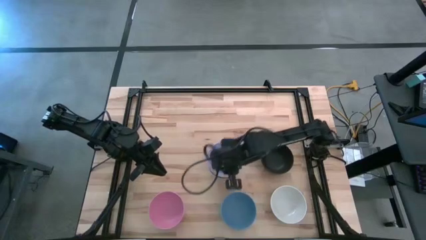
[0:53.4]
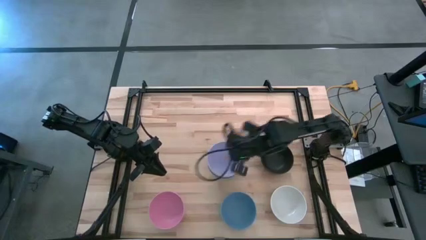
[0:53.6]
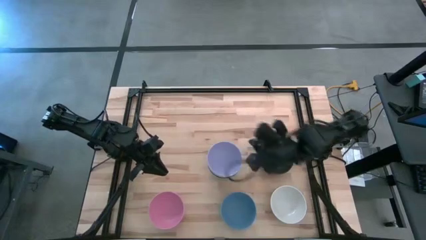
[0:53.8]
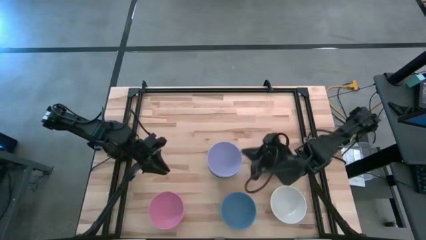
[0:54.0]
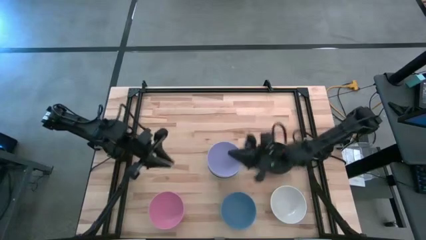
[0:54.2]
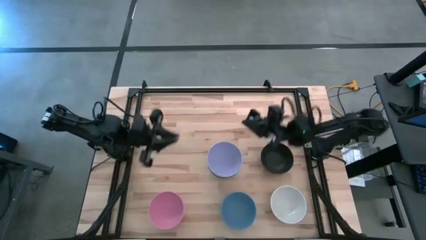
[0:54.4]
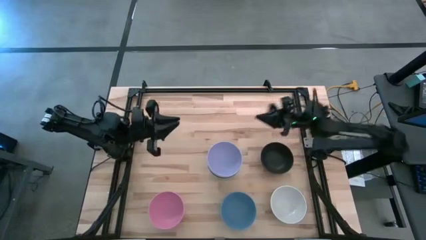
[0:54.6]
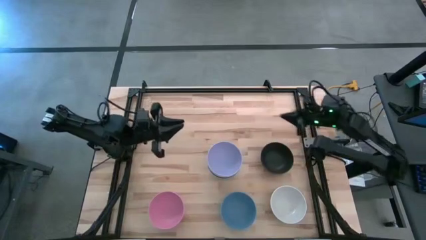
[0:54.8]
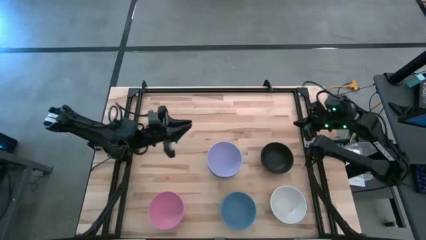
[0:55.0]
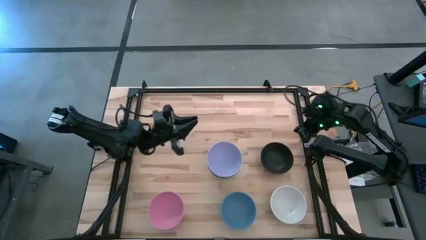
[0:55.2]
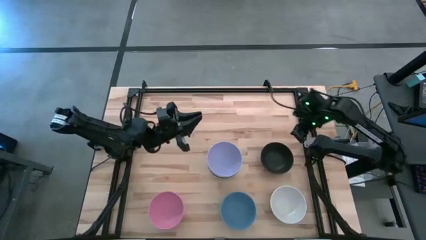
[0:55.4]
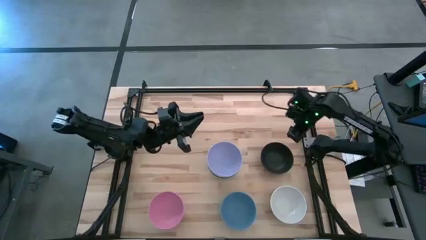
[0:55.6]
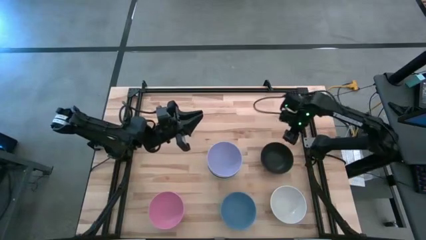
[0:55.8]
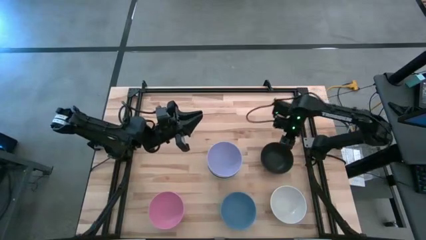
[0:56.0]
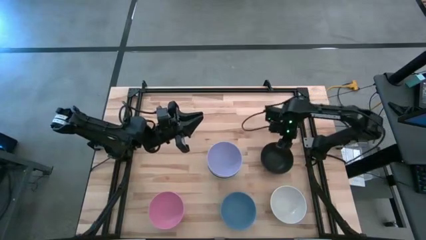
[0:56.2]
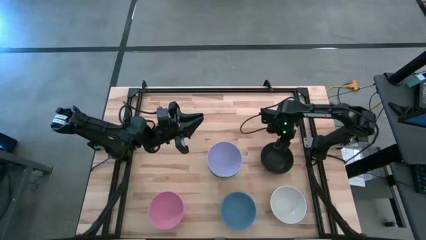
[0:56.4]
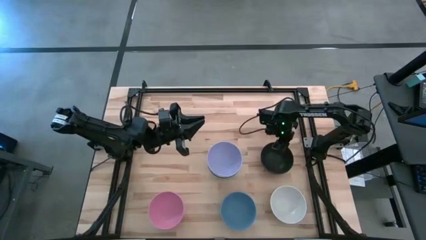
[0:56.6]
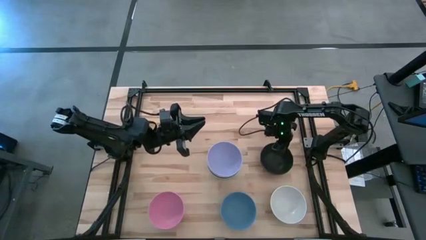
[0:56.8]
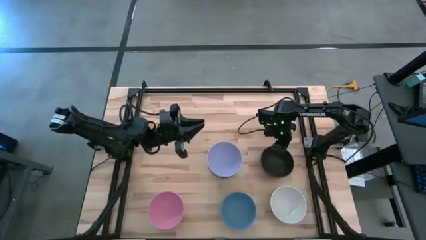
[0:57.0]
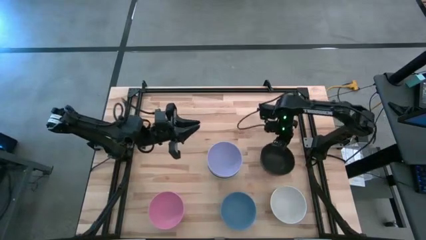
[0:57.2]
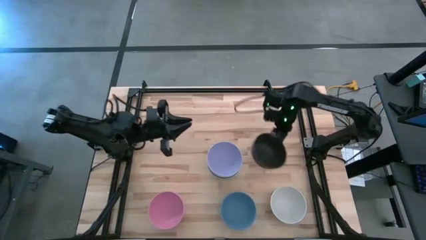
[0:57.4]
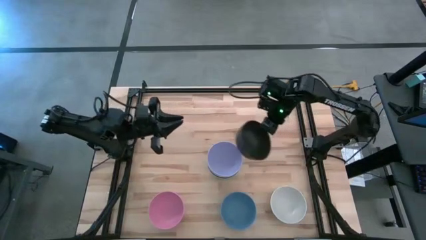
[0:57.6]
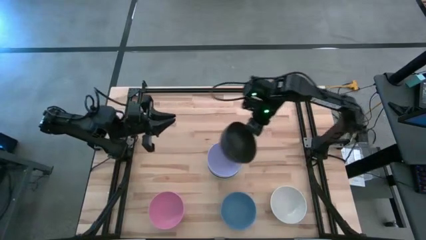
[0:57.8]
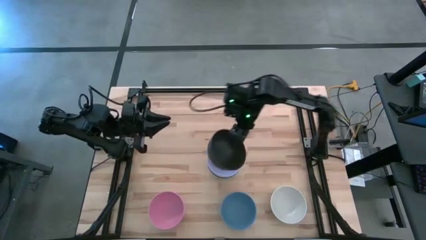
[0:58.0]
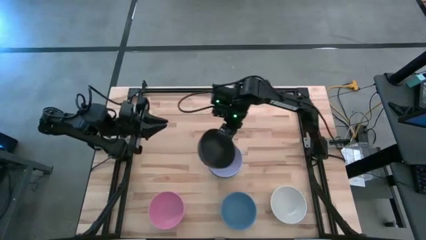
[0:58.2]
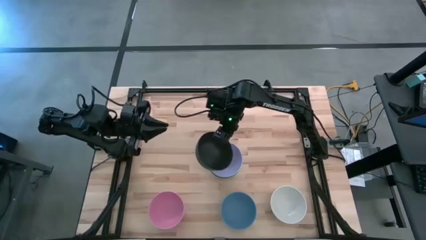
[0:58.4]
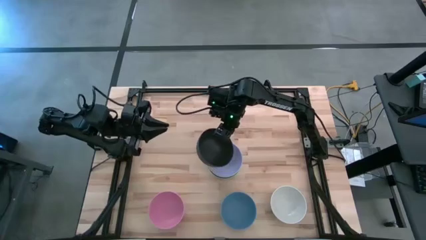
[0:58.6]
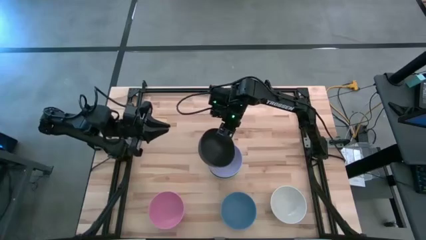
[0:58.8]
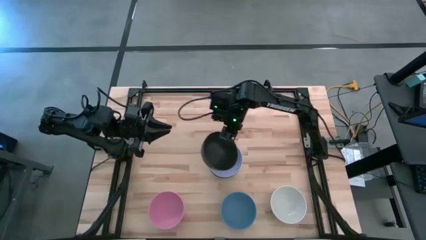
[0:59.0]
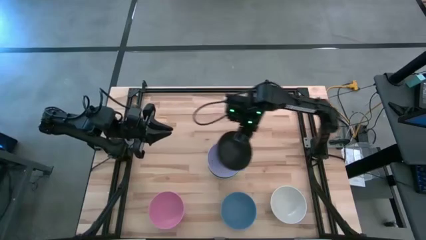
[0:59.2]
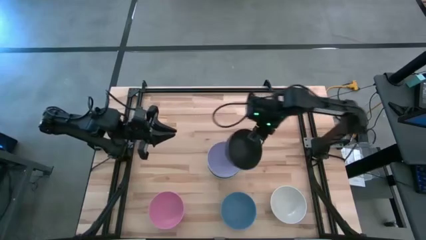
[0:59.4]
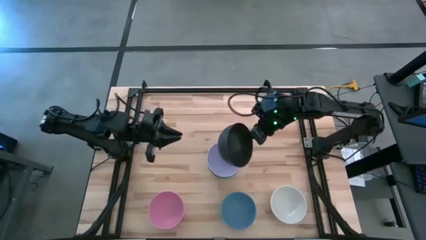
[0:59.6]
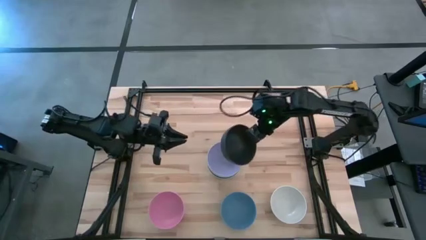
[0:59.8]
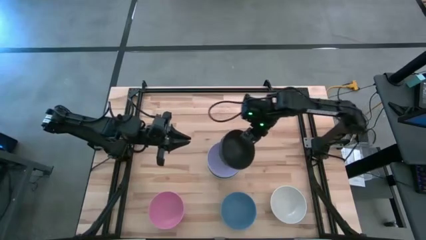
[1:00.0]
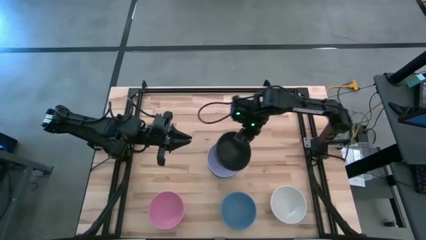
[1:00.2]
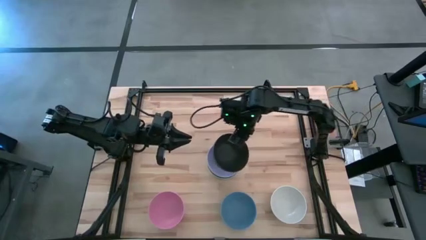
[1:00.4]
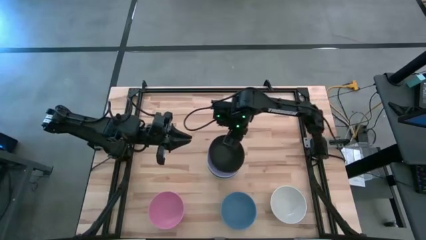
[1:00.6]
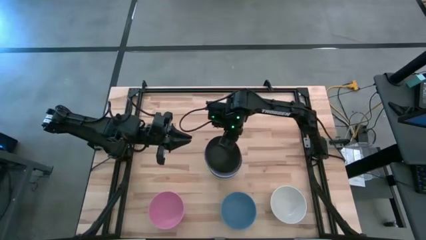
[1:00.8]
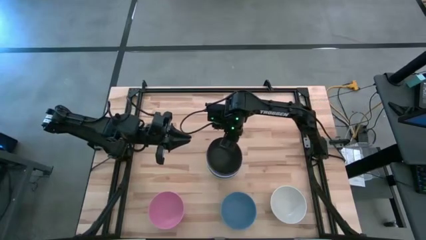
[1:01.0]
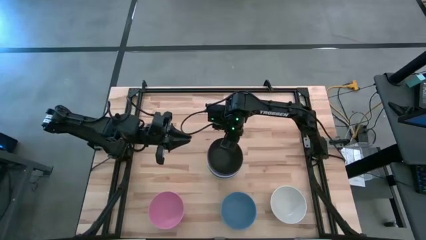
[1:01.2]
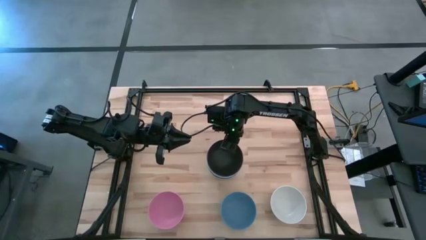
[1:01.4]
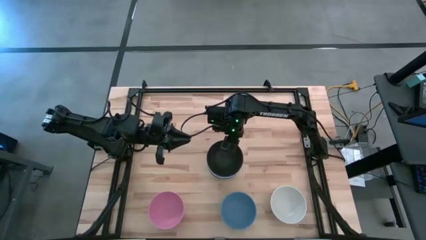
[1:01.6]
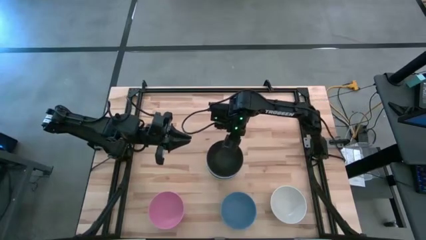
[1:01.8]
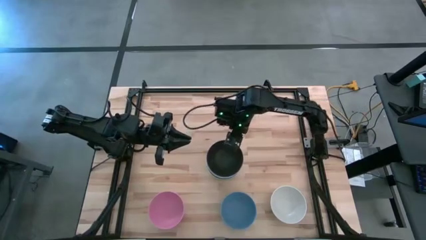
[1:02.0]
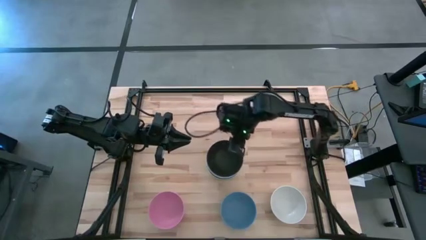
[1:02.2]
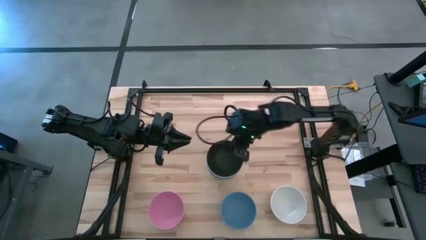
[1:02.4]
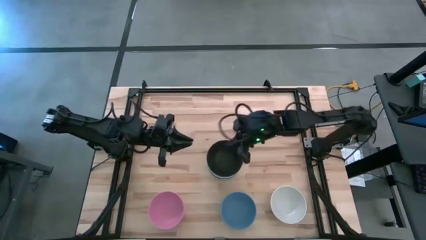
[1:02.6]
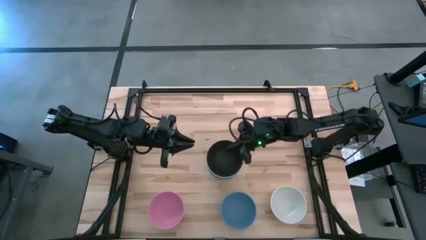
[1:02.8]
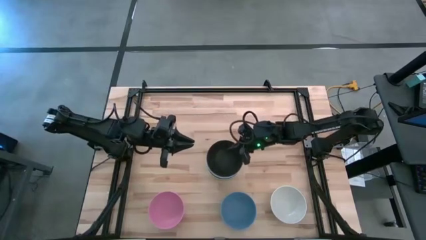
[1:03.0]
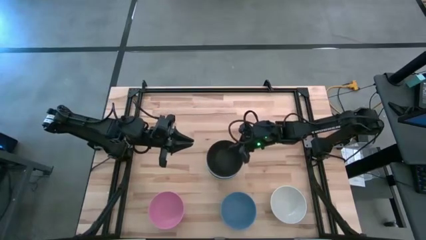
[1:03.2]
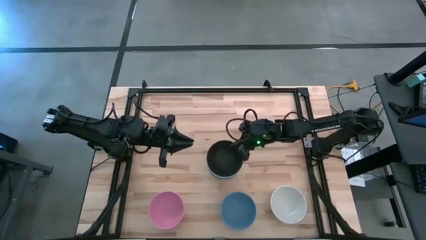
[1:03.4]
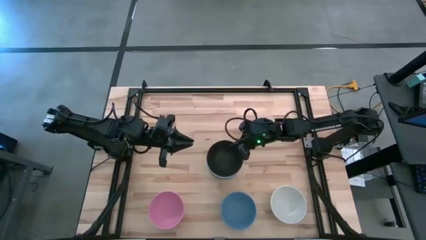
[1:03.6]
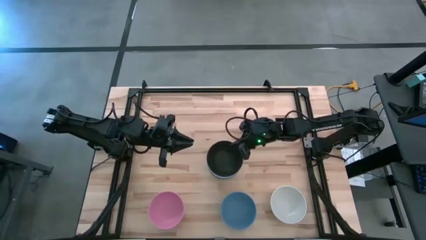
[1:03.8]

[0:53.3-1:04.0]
Task: Nest bowls inside each other
Stack the black bowl on the purple bowl

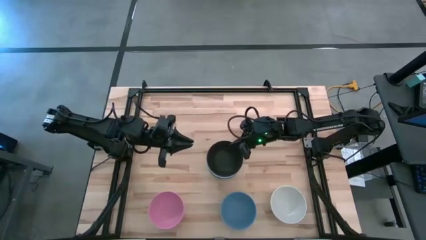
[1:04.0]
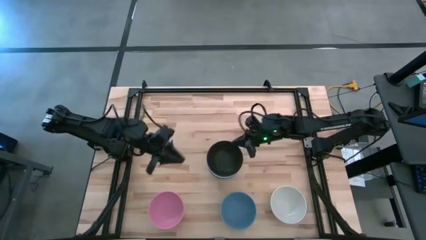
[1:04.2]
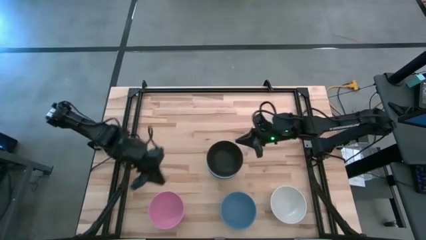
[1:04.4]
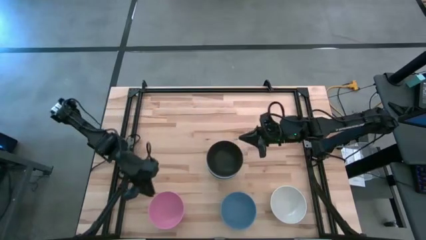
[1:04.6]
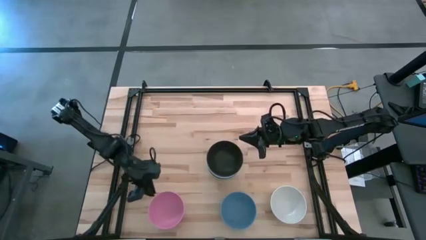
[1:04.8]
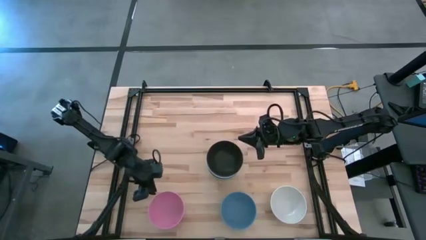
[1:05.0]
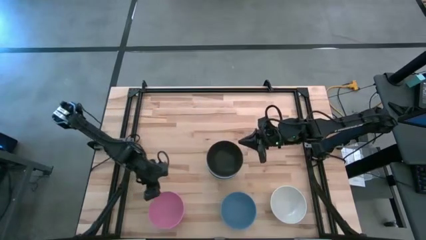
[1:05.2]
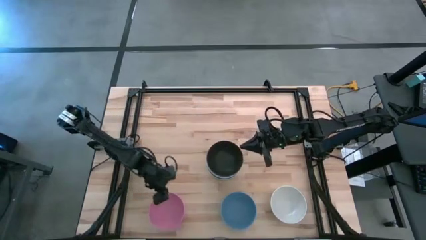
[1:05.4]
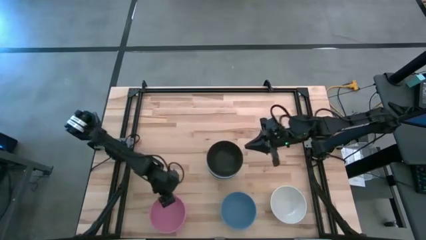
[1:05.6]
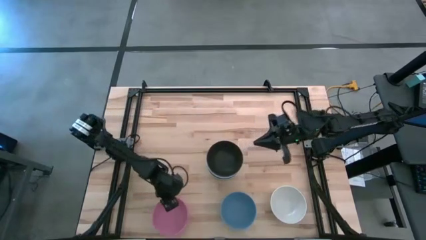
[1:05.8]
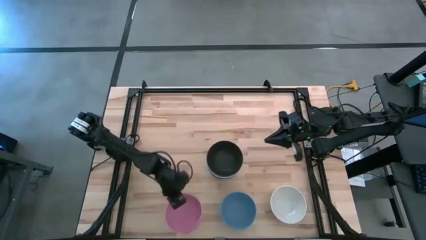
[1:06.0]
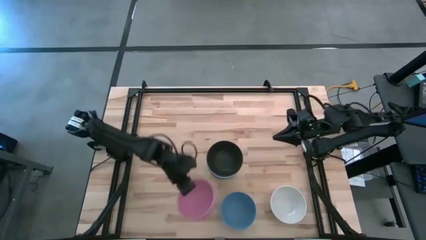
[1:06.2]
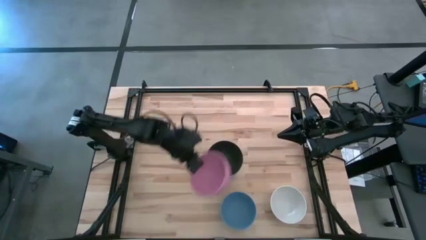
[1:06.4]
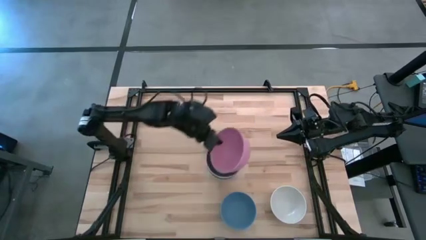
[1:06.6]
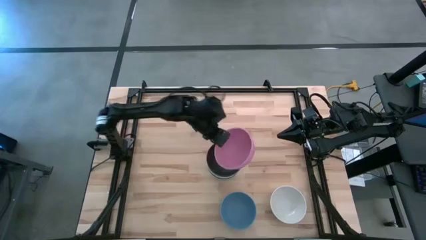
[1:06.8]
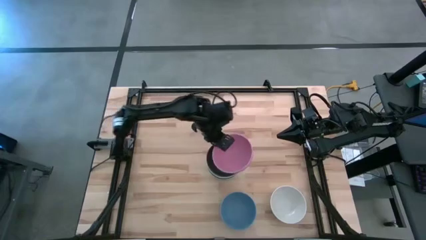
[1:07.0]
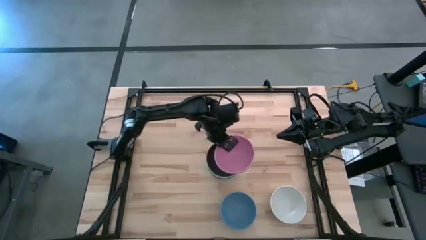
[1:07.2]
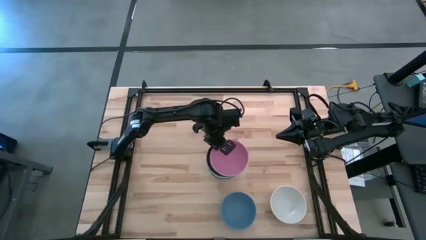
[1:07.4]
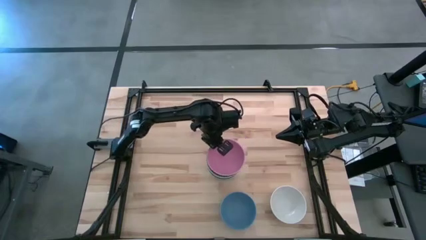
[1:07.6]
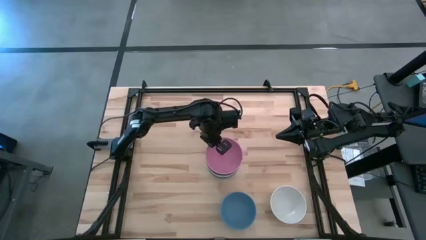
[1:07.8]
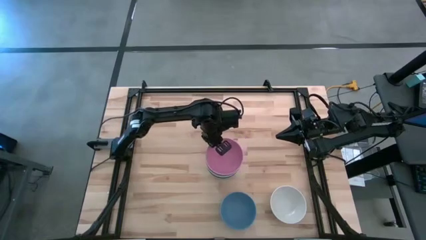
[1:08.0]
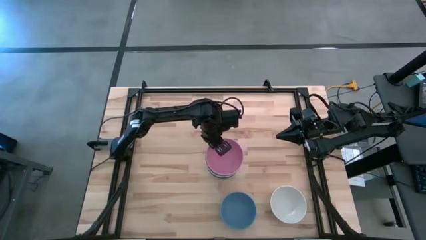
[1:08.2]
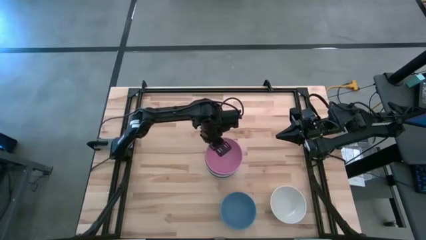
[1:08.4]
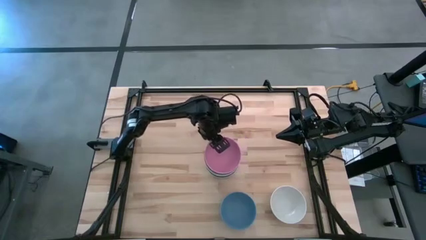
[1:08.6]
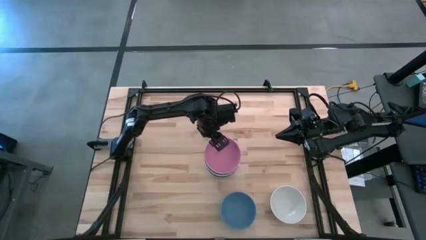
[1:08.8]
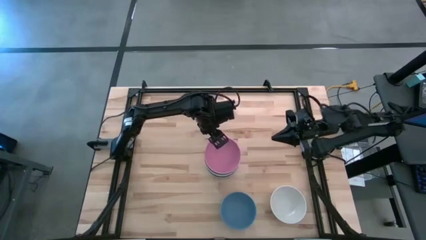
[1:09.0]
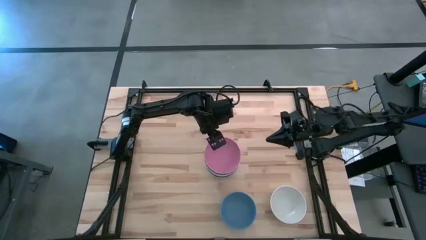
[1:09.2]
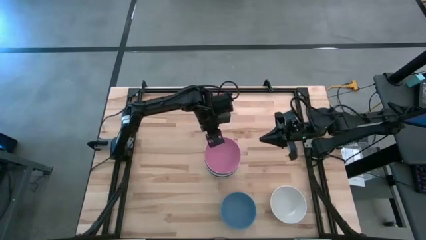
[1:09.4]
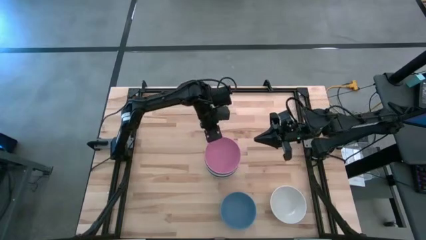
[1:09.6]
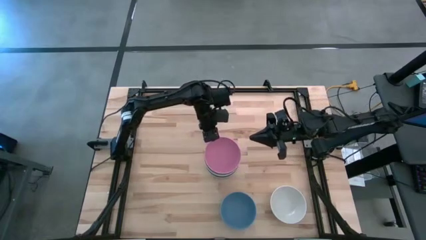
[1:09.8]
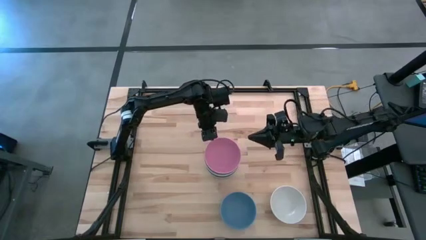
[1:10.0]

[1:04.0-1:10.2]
Stack the pink bowl on the black bowl

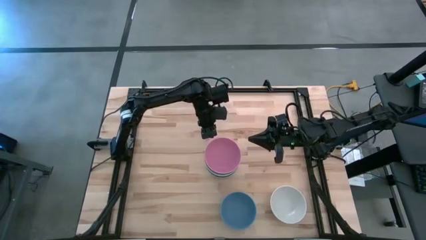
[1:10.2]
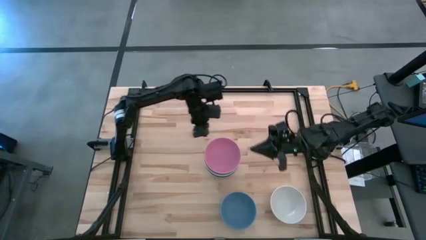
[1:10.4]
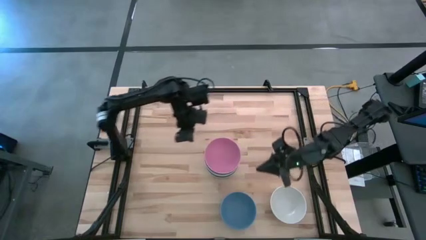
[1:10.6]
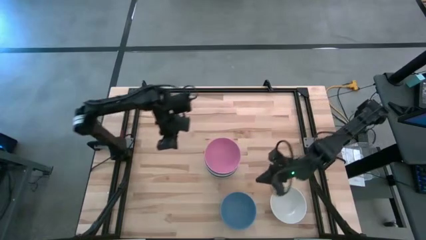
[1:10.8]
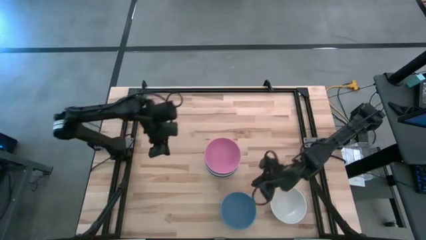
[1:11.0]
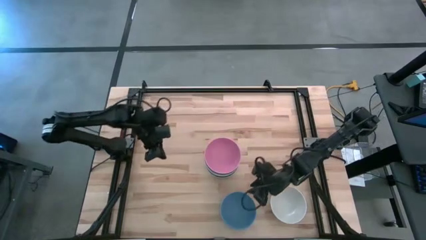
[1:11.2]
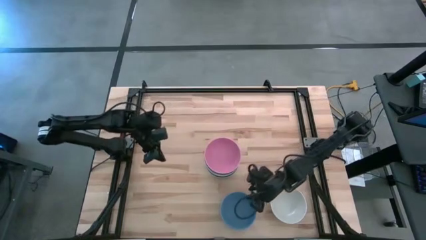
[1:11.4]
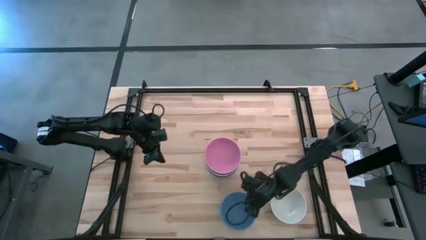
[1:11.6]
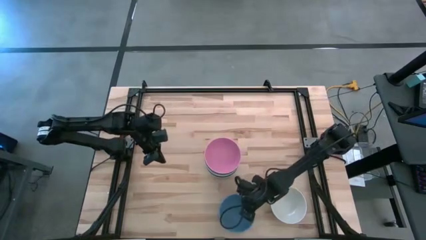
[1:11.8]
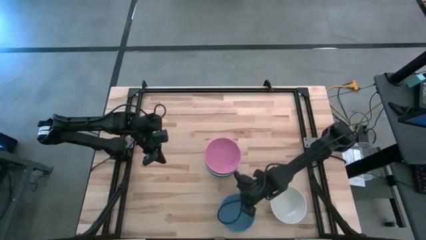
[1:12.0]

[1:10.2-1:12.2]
Stack the blue bowl on the pink bowl
